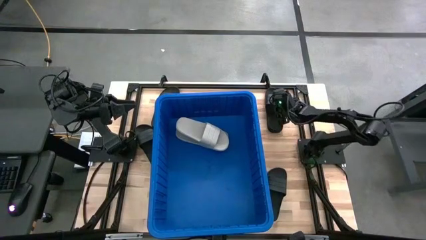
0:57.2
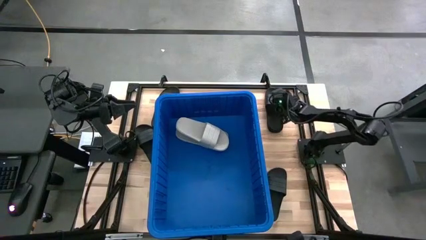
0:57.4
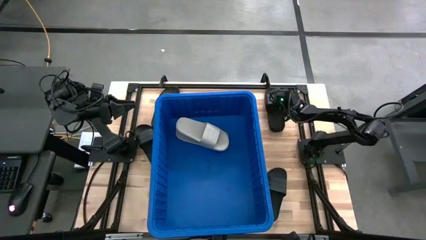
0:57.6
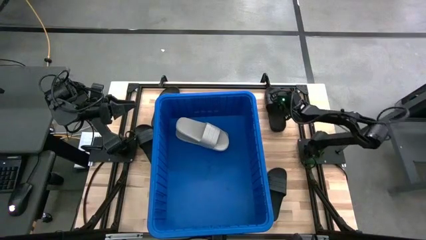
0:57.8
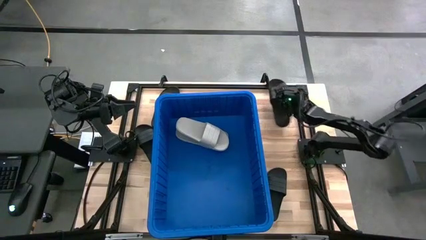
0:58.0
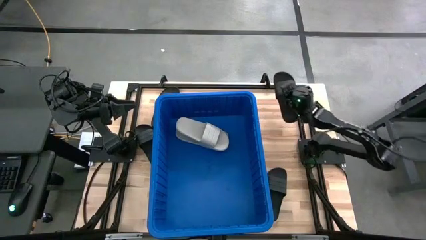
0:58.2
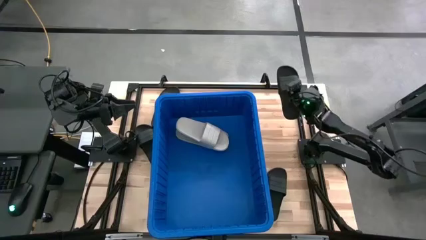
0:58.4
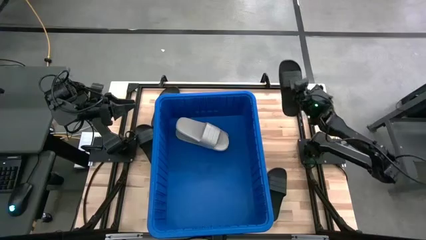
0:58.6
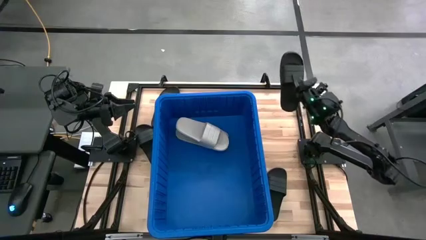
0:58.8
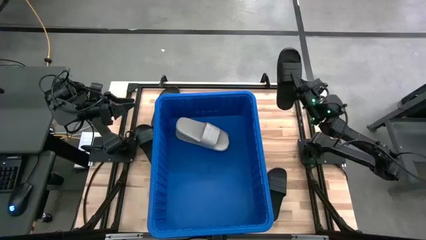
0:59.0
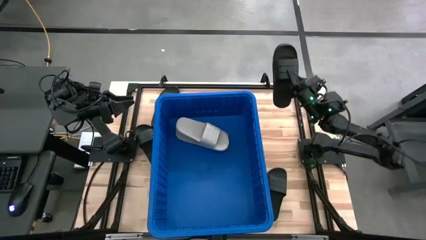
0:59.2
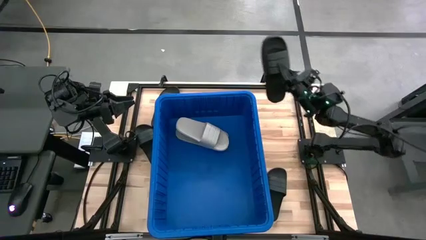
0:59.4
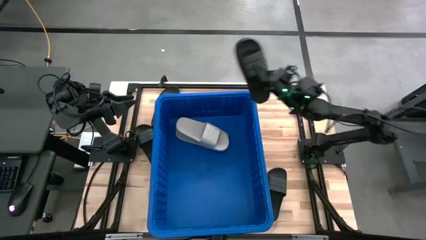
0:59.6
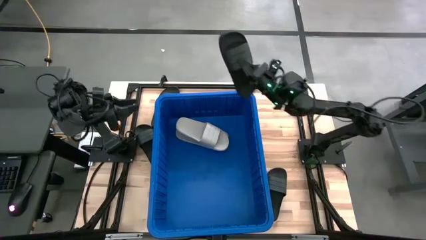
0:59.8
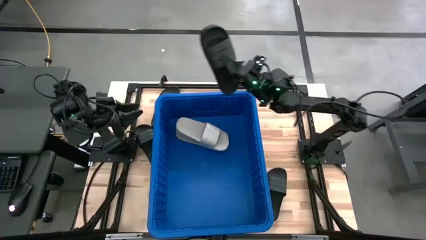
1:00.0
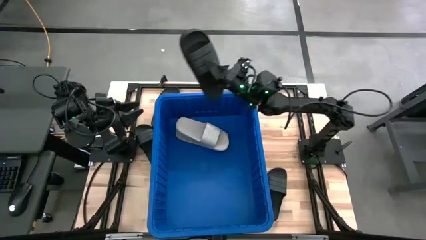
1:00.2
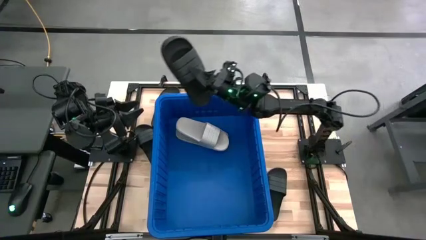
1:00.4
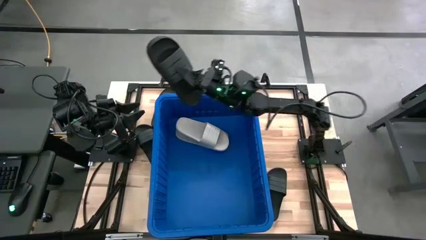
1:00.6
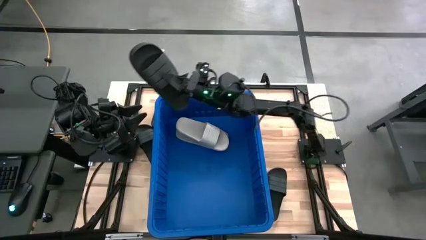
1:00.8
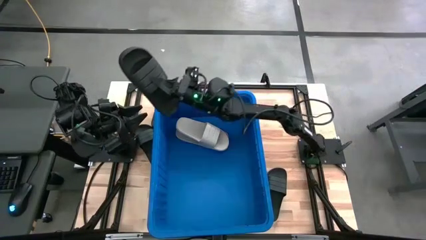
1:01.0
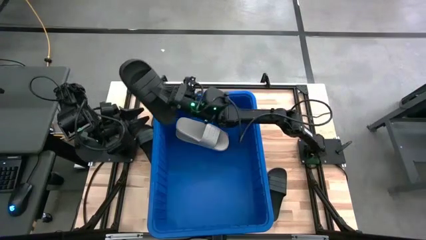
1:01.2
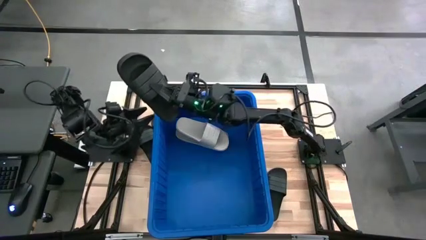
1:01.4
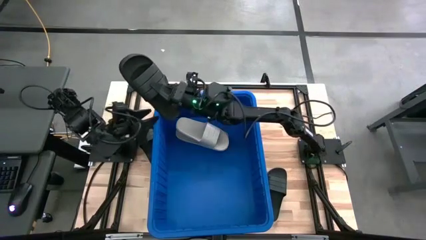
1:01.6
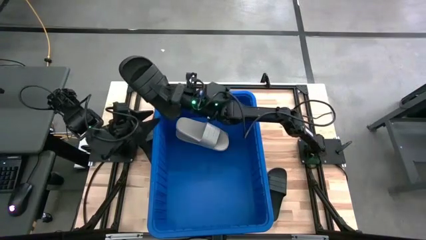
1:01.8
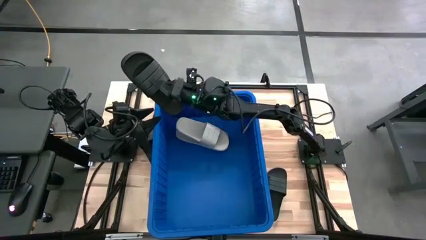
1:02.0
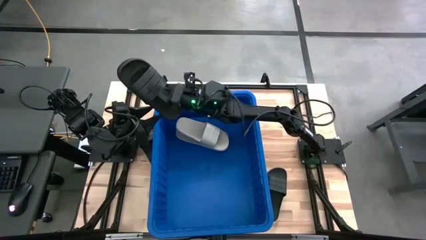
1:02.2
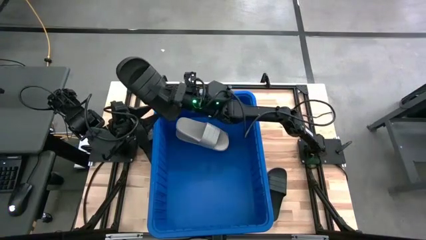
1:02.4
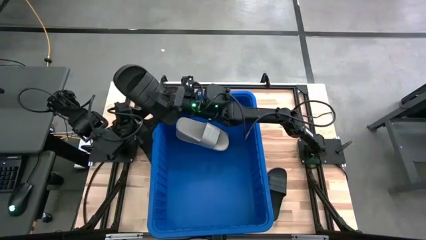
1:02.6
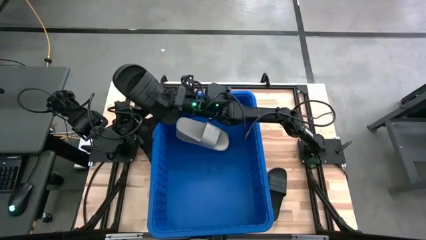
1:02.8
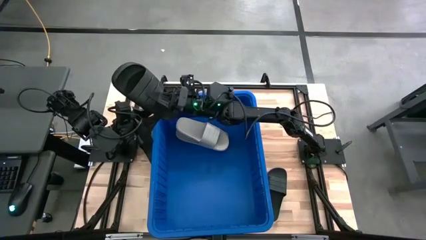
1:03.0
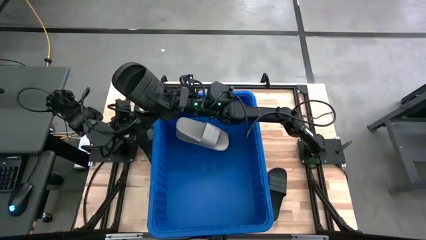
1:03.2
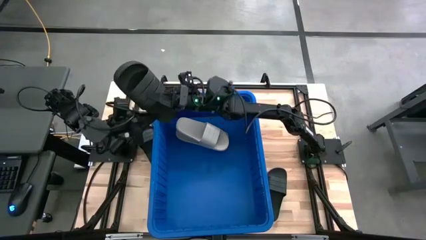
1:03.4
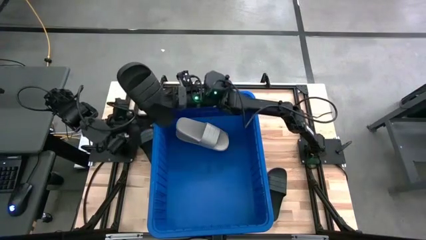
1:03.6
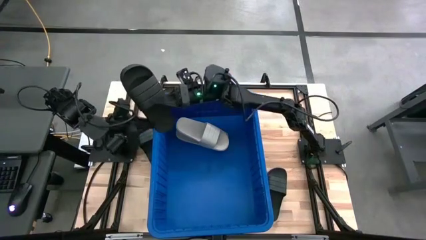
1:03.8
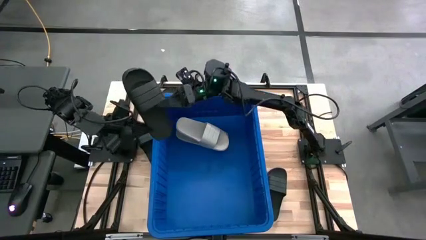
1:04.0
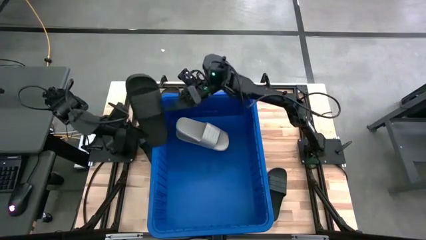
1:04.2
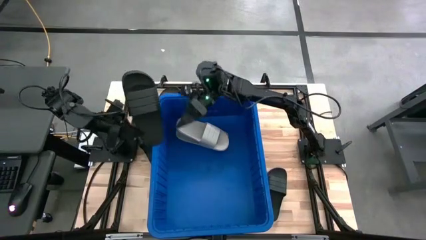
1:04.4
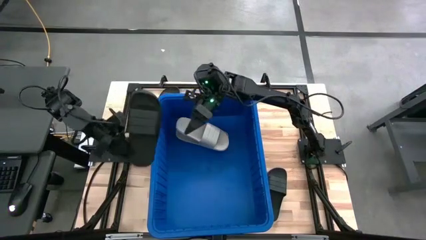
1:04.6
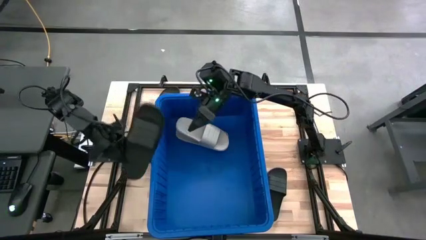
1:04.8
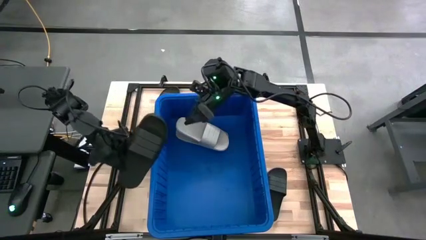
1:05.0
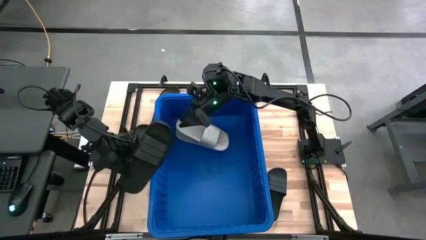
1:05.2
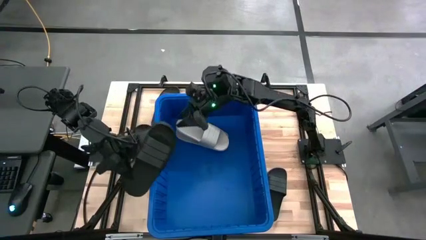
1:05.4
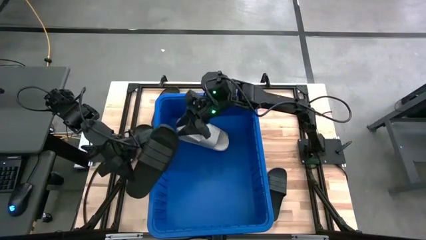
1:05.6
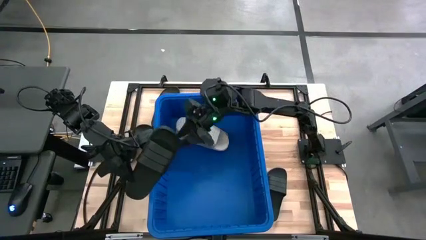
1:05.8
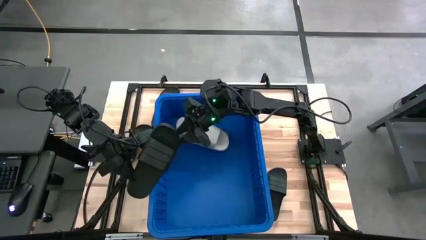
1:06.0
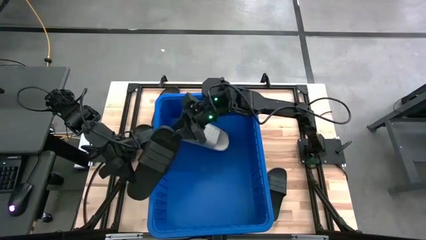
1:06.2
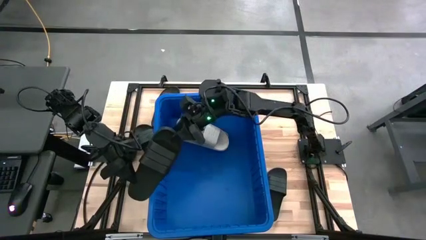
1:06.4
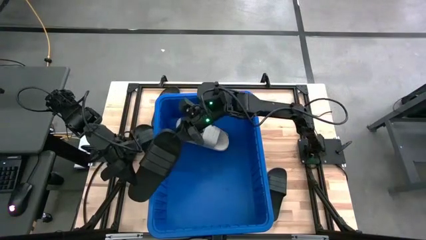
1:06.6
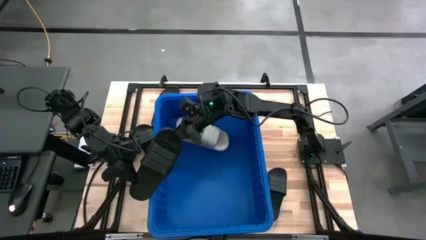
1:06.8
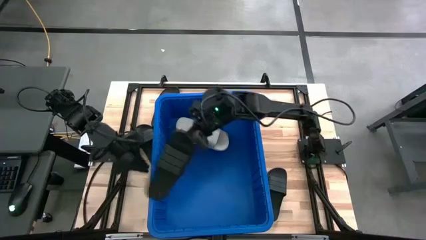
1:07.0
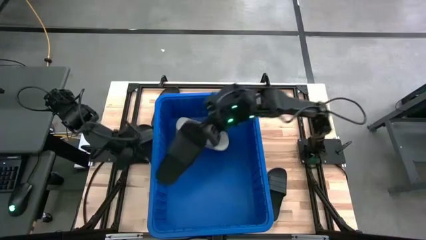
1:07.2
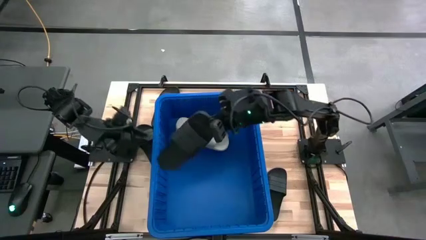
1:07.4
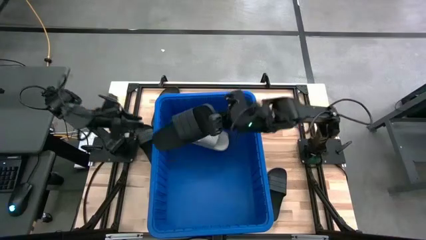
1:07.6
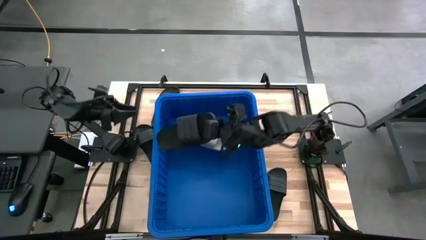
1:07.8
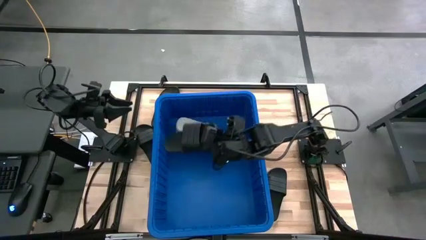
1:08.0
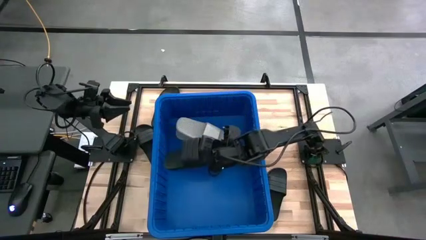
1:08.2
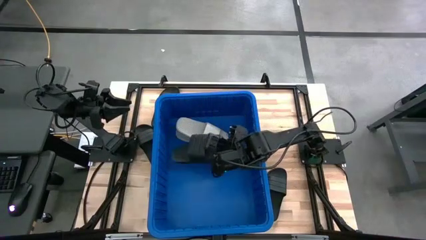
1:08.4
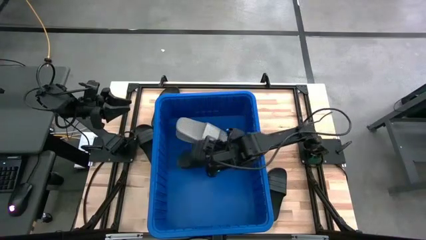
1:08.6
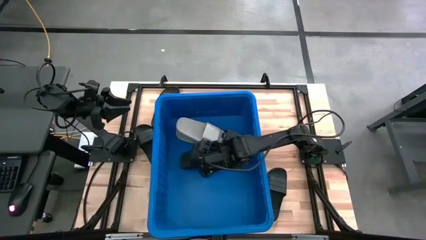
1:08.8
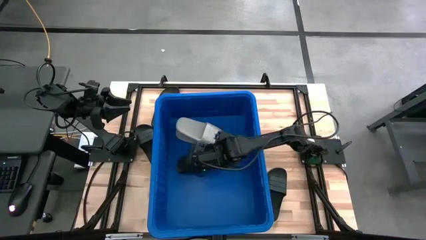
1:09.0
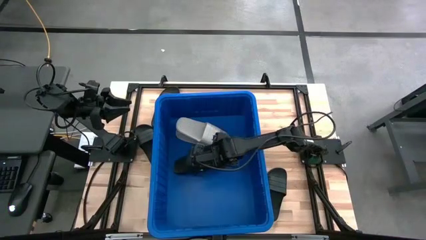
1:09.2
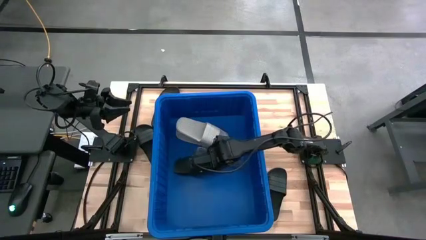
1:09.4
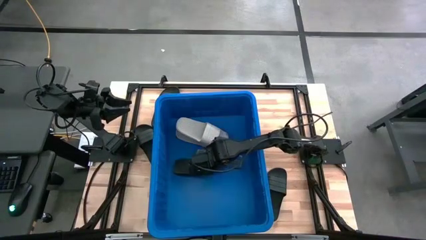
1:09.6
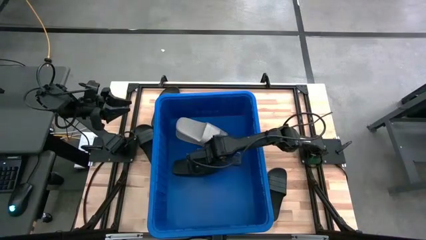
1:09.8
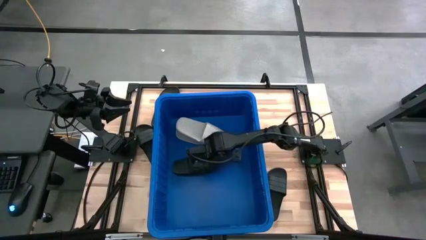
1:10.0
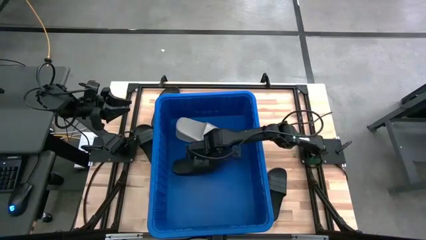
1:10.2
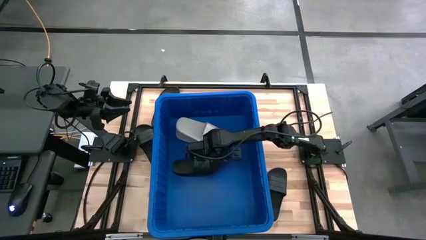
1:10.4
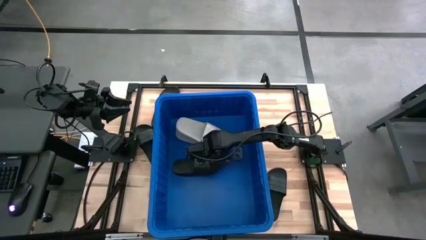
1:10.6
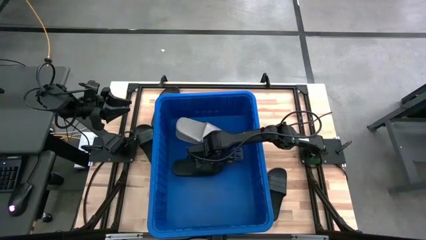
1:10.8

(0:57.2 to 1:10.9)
Task: Pick and place slides into bin
Put the black slide into the blue bin
